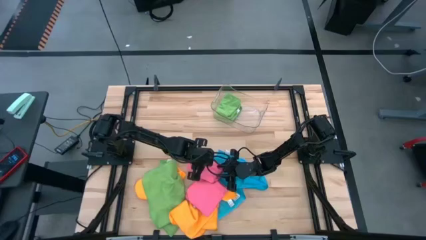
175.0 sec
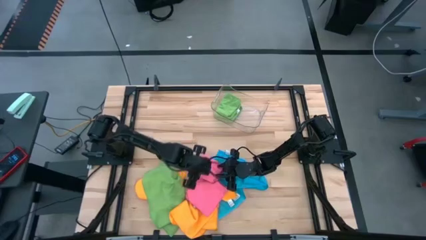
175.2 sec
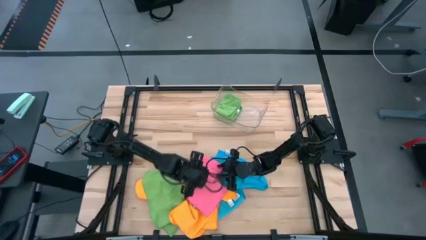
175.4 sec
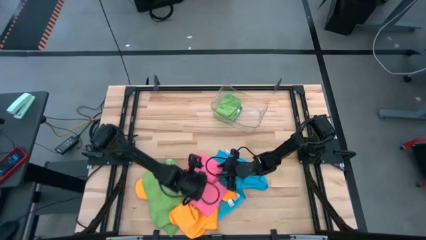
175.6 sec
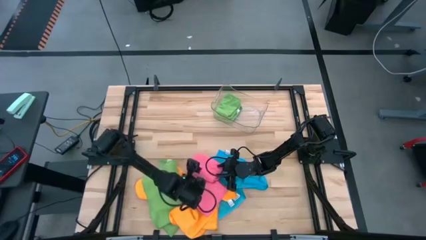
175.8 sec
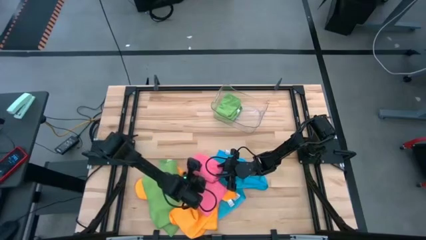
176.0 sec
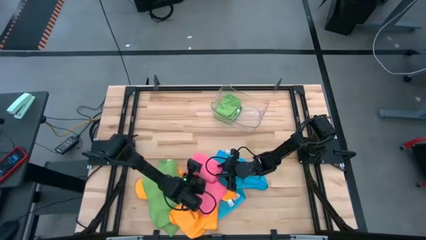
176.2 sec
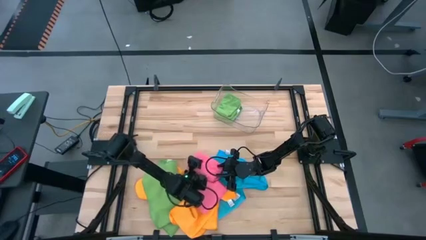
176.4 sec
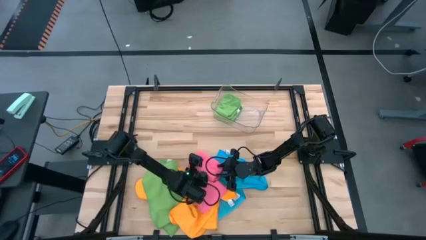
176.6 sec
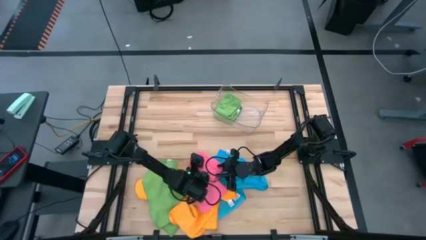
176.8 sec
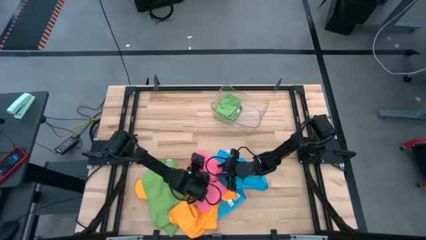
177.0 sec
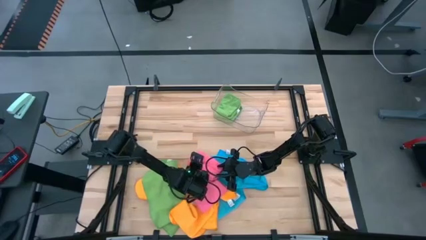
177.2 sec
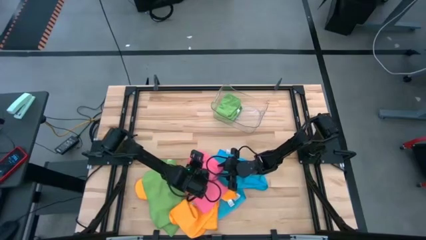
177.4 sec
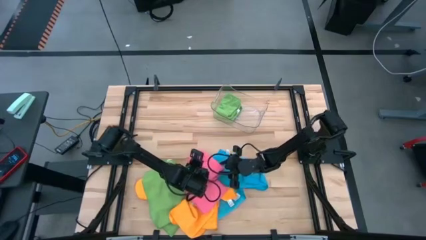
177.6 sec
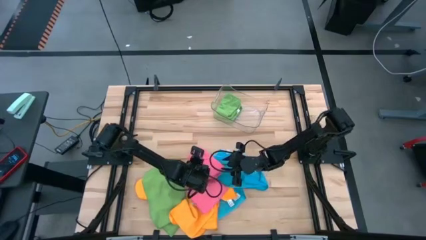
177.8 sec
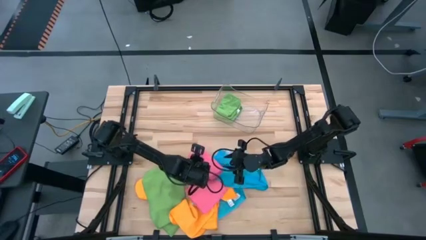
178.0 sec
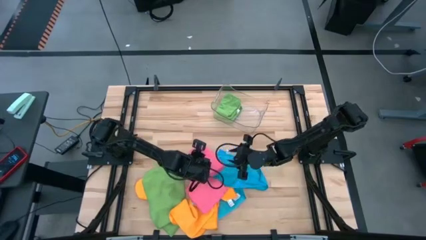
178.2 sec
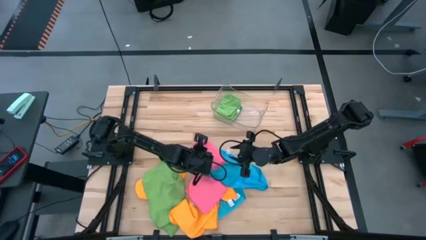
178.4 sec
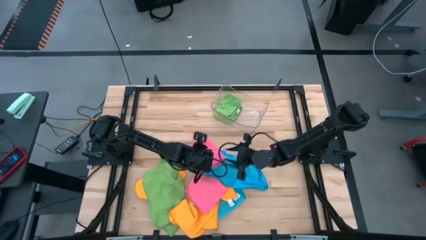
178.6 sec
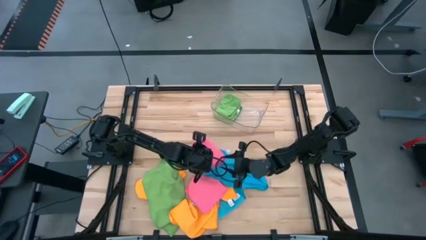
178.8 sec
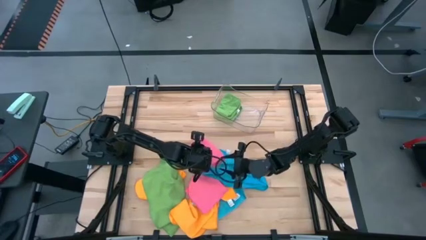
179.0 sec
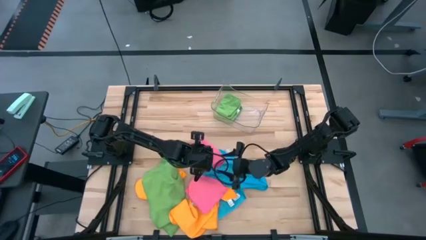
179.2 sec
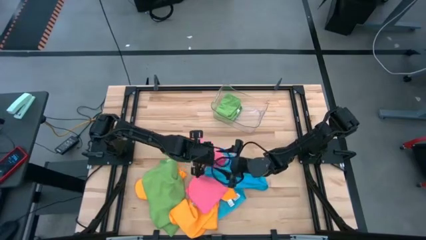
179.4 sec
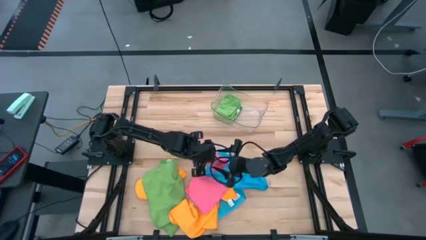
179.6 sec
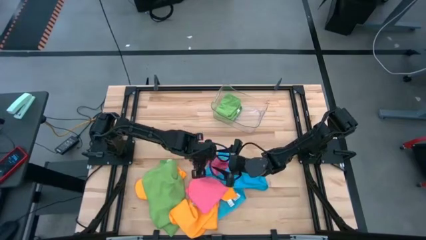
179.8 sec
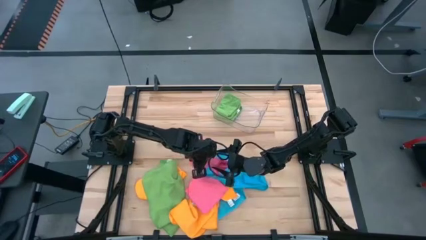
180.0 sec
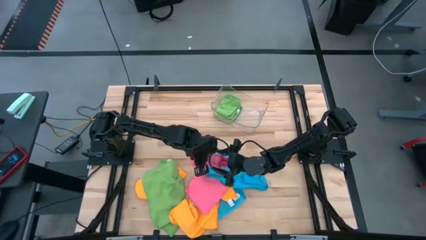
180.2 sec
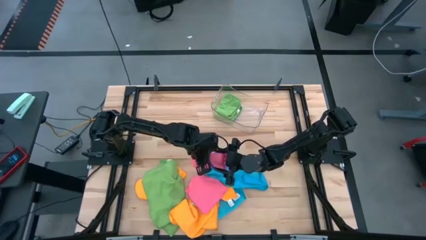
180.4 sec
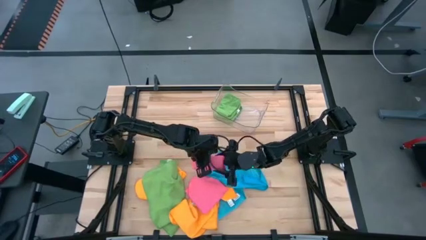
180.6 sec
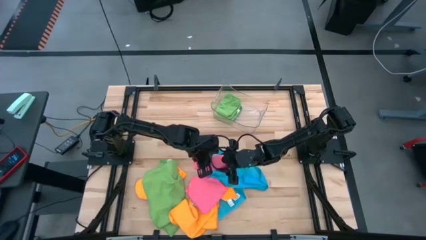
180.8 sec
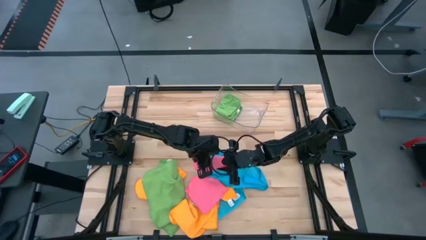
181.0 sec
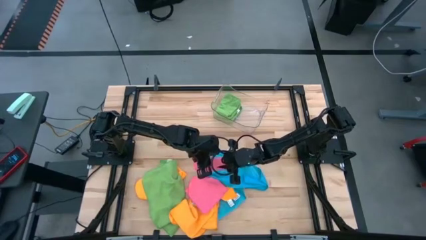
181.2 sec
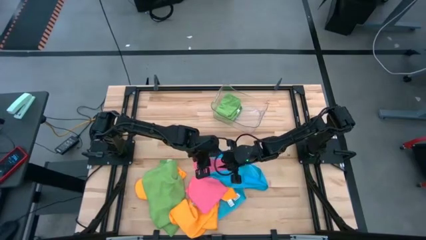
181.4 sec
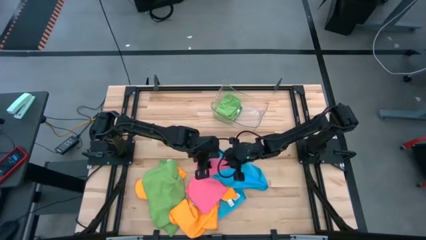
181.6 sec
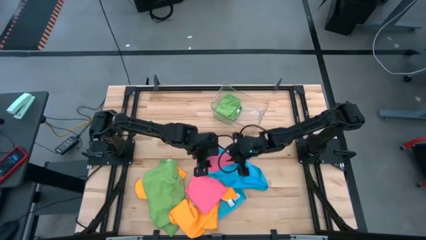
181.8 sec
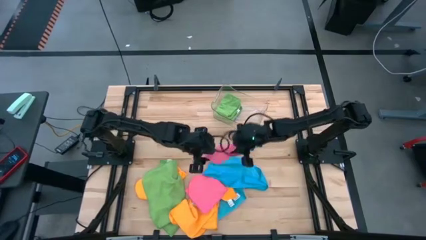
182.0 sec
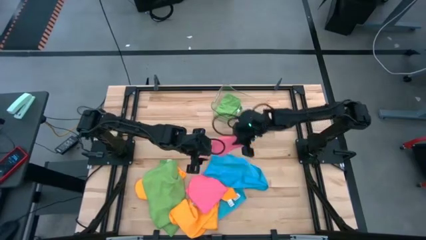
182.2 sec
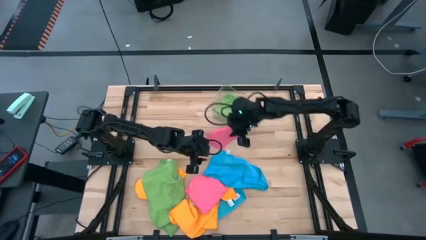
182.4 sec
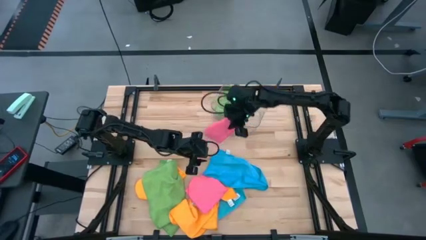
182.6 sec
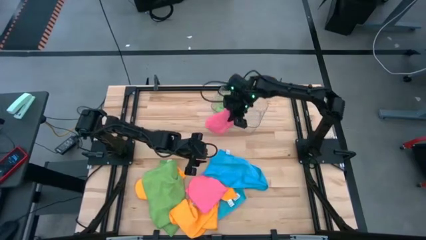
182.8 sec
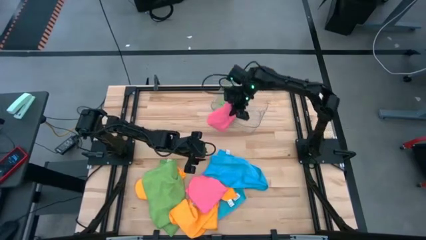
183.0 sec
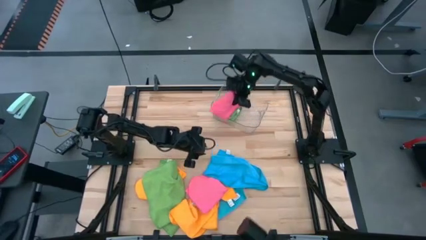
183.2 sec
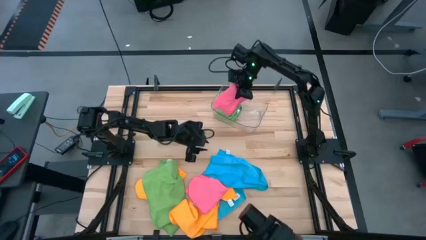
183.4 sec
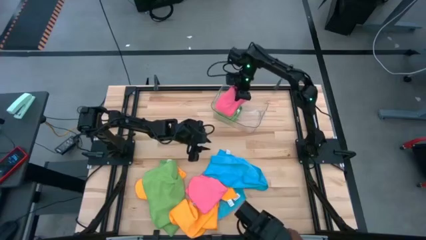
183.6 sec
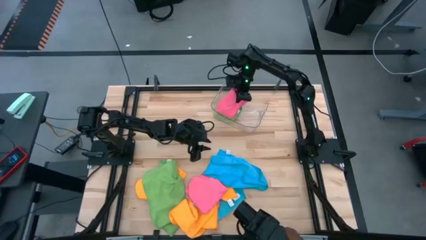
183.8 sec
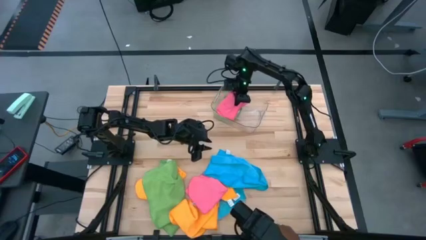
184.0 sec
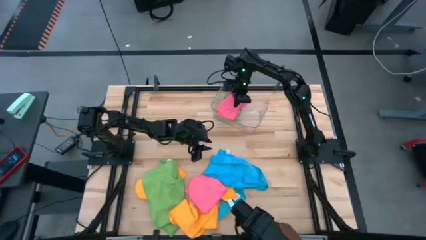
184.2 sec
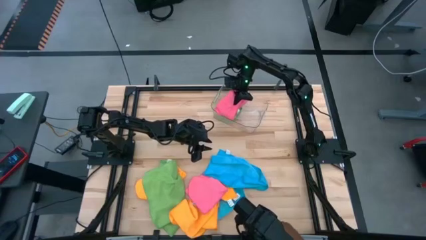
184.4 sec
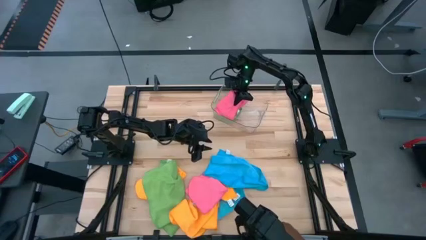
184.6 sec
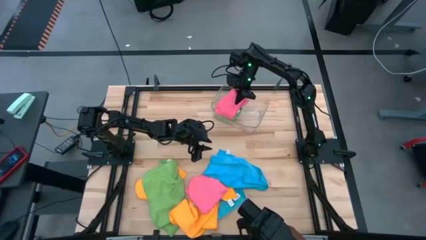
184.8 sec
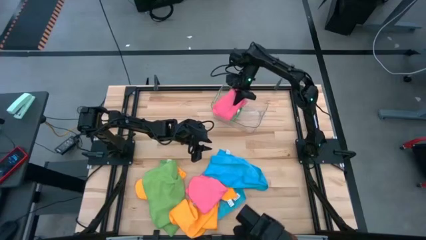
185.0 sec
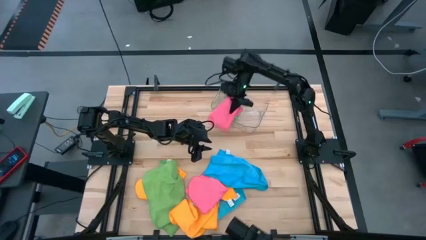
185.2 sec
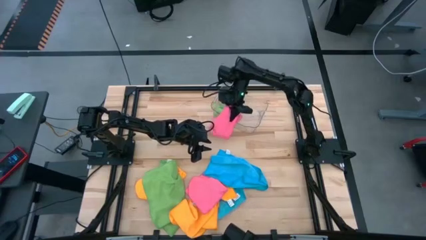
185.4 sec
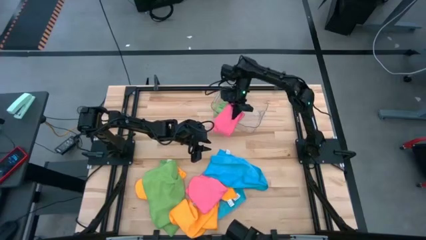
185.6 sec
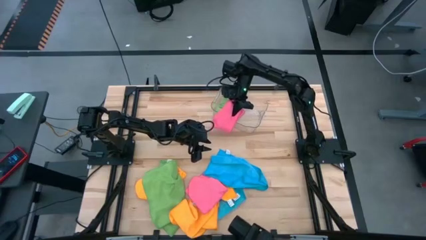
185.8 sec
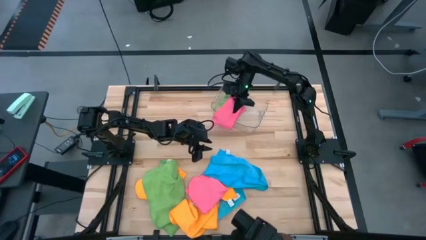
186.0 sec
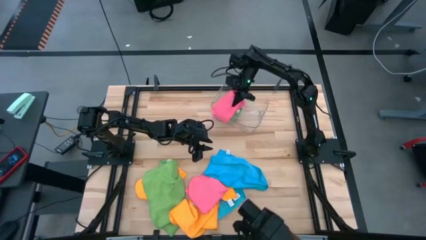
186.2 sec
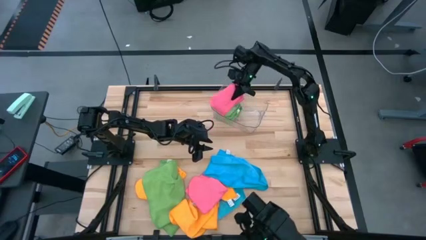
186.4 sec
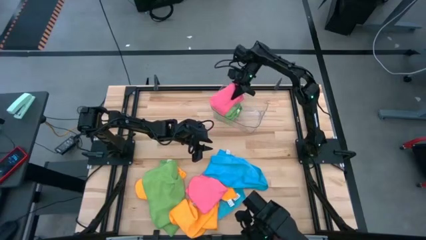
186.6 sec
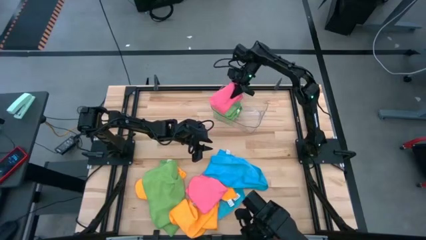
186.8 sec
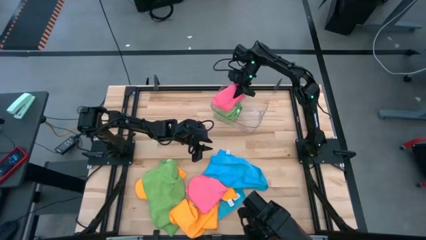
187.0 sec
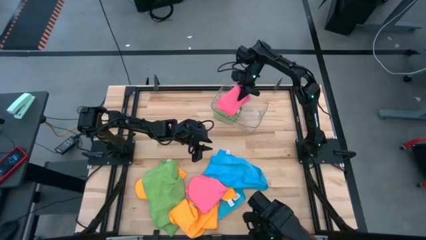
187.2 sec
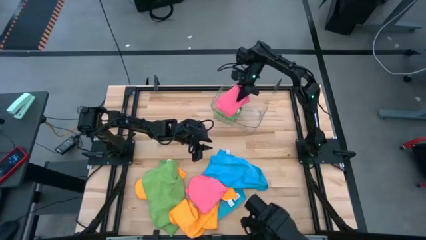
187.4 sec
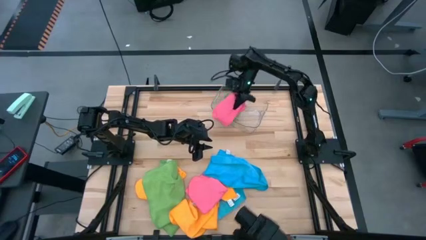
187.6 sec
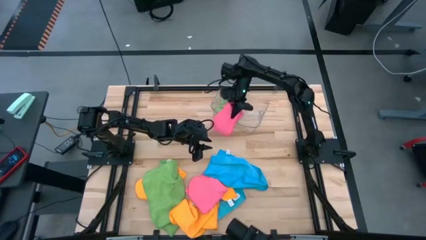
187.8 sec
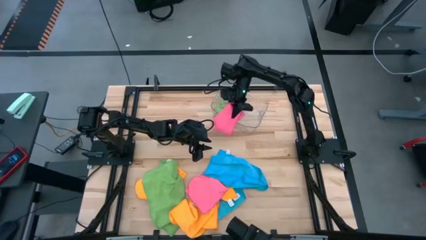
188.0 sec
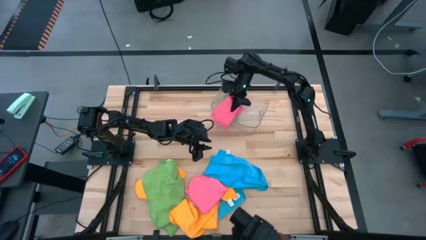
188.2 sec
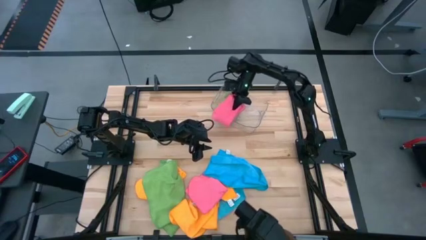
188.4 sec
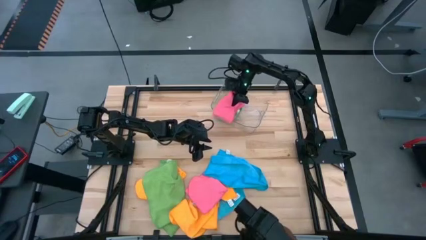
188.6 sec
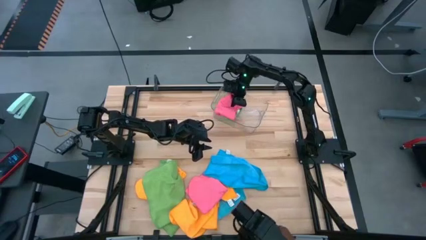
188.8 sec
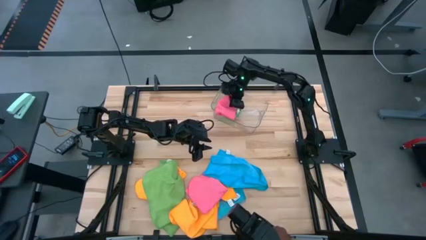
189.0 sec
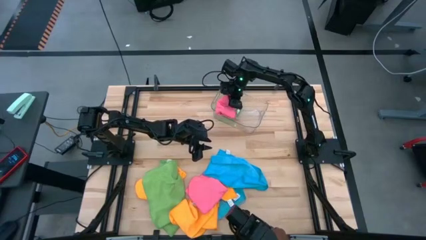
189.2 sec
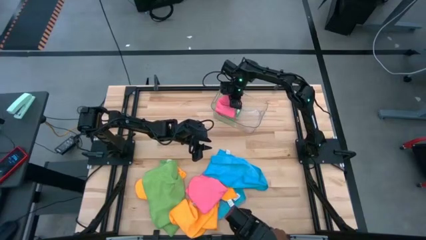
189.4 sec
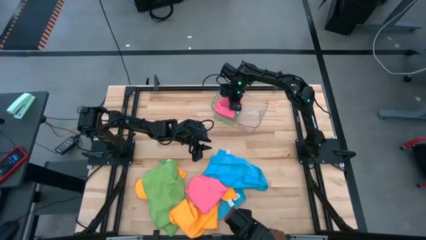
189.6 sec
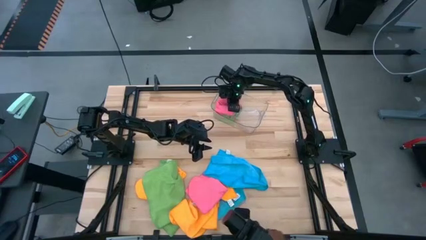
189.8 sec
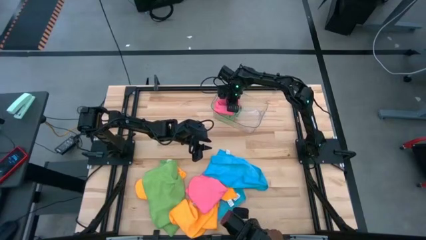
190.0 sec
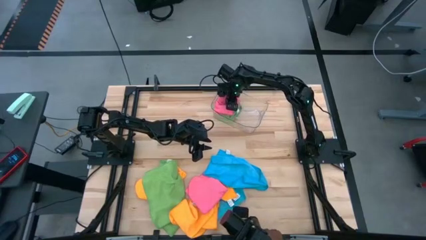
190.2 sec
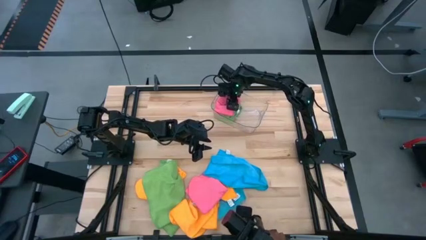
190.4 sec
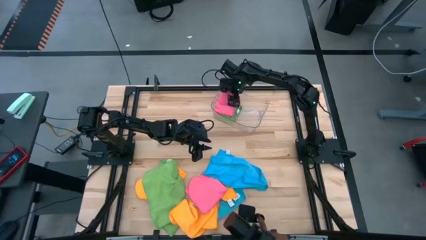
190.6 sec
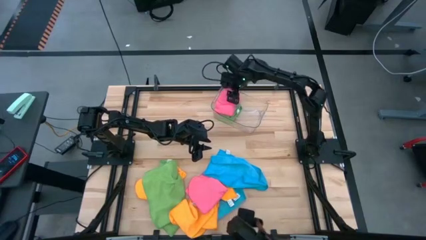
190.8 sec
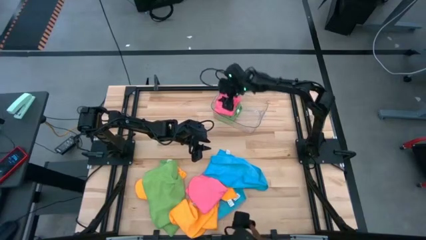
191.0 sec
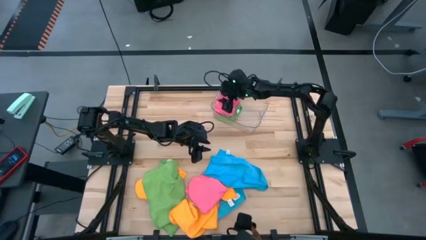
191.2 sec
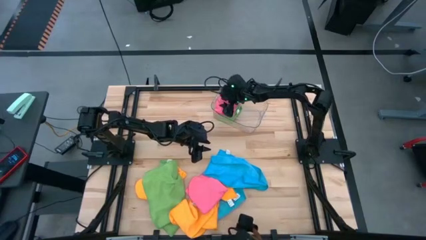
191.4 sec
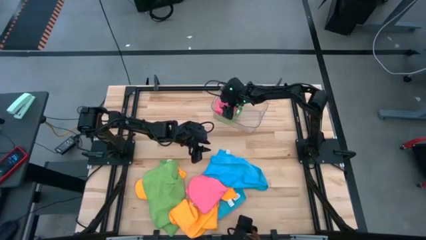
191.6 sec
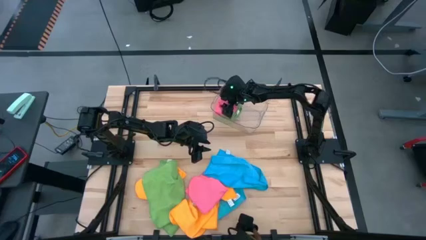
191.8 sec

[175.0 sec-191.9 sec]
Task: Fold microfiber towels
Stack the top pink towel on top of the green towel
